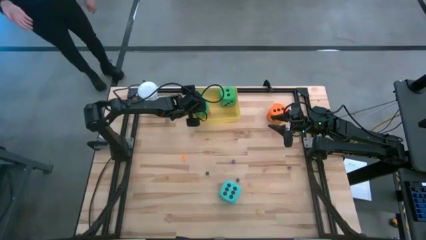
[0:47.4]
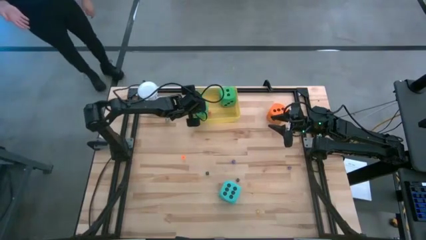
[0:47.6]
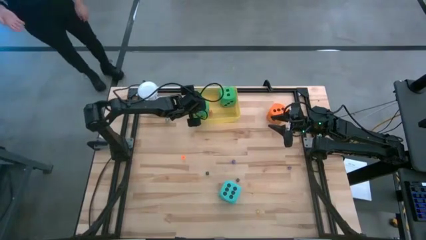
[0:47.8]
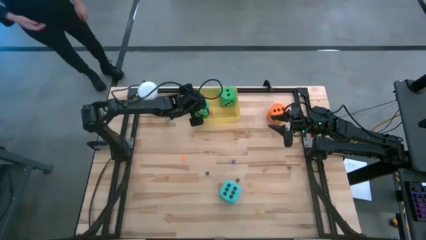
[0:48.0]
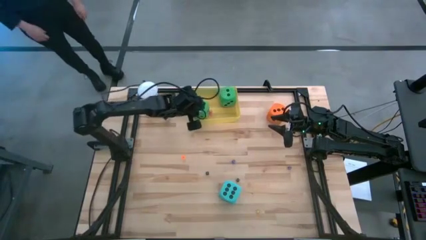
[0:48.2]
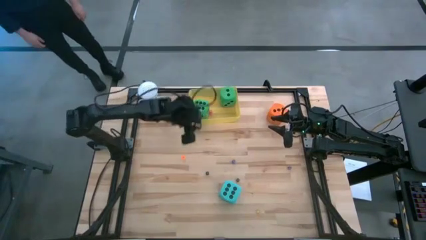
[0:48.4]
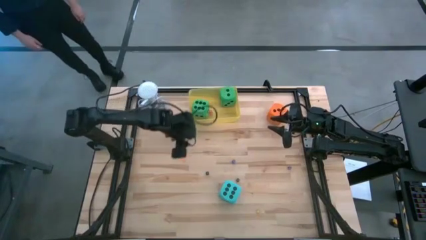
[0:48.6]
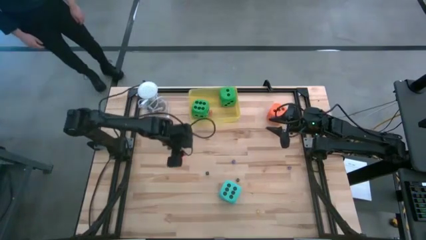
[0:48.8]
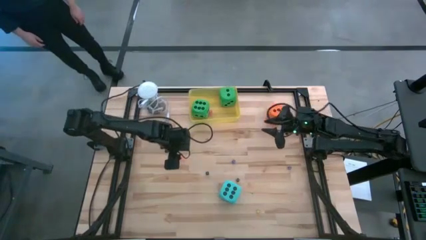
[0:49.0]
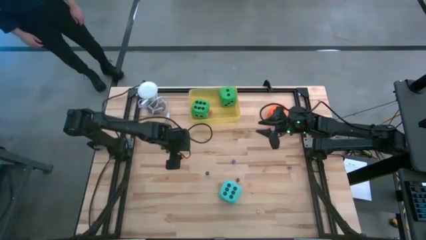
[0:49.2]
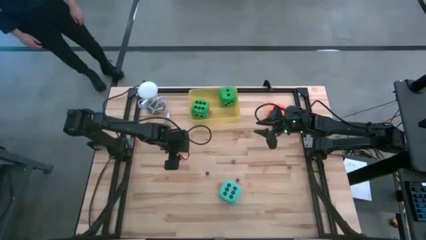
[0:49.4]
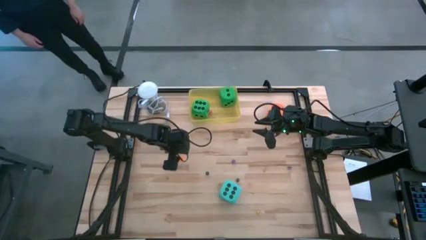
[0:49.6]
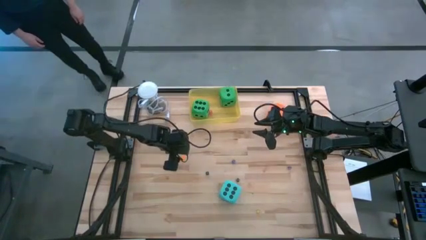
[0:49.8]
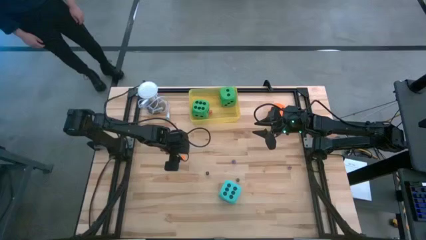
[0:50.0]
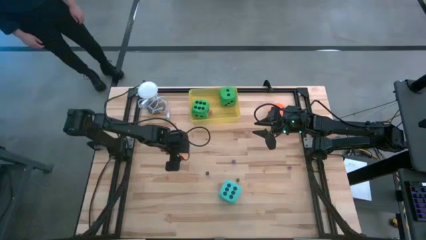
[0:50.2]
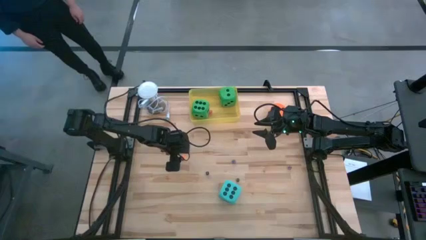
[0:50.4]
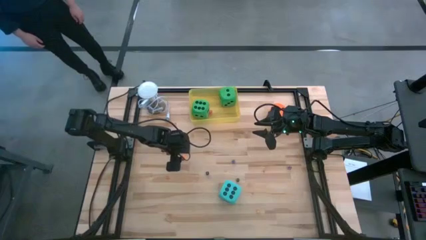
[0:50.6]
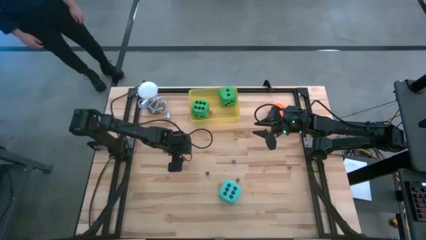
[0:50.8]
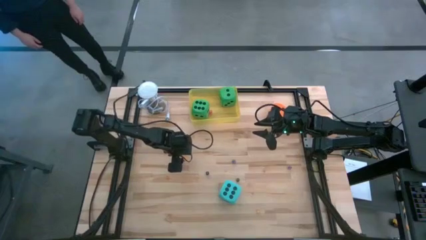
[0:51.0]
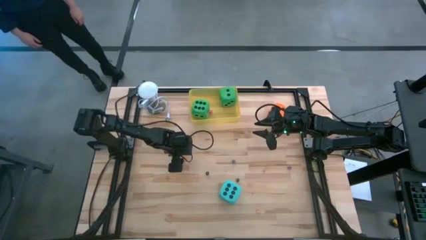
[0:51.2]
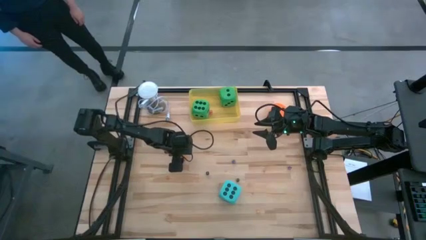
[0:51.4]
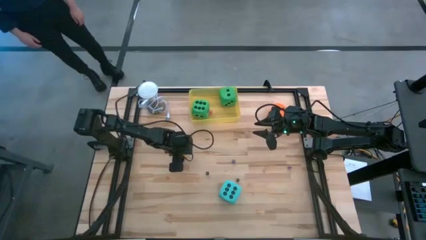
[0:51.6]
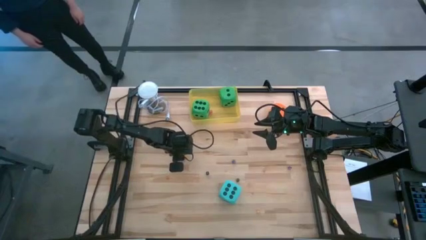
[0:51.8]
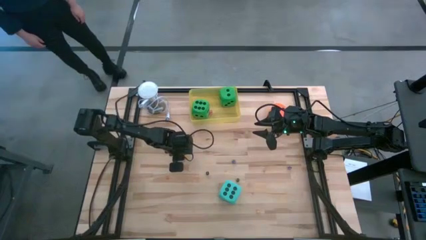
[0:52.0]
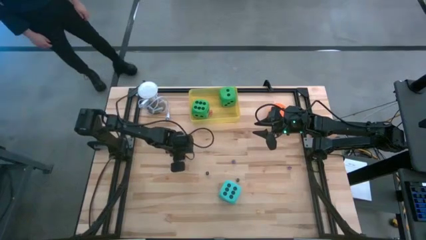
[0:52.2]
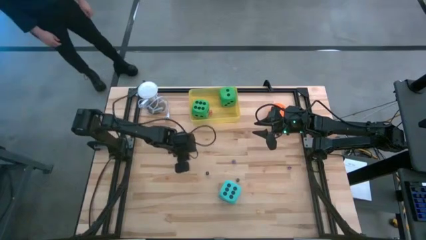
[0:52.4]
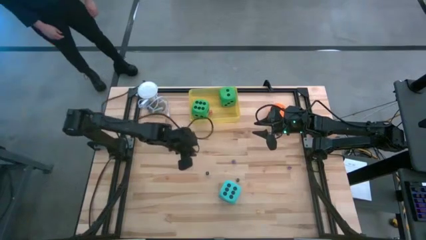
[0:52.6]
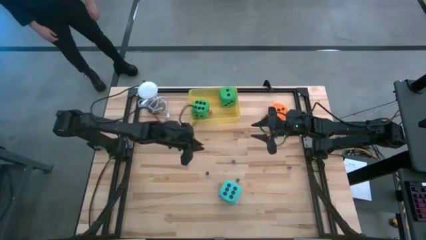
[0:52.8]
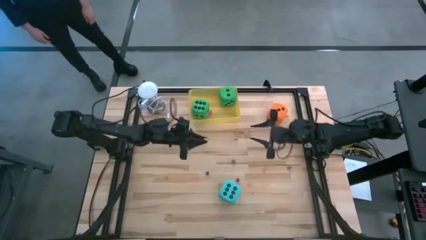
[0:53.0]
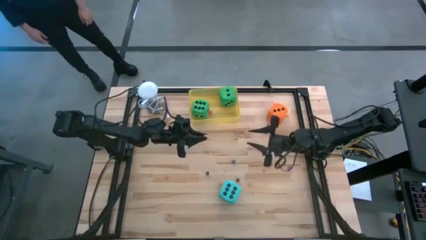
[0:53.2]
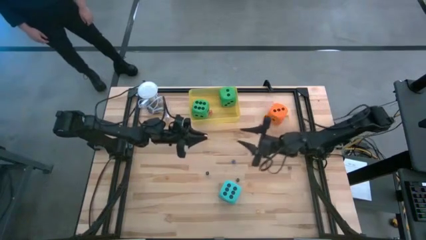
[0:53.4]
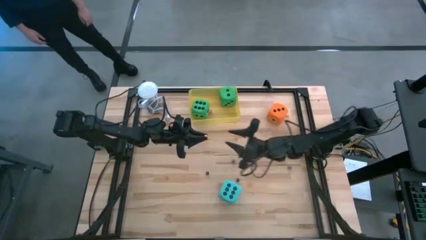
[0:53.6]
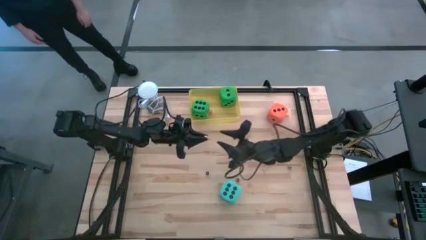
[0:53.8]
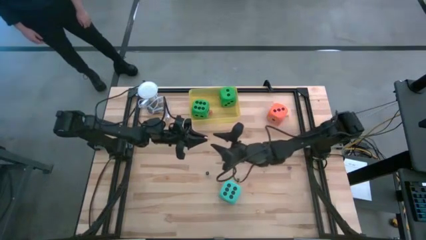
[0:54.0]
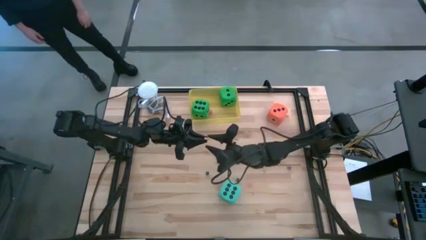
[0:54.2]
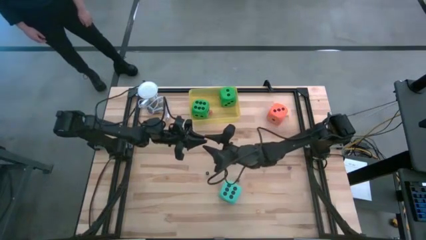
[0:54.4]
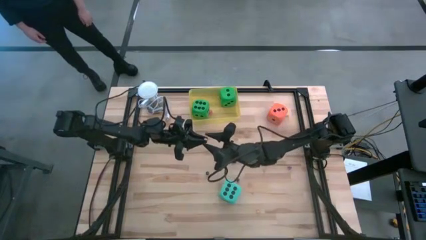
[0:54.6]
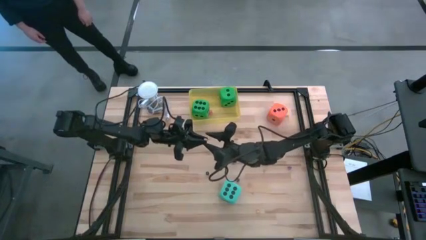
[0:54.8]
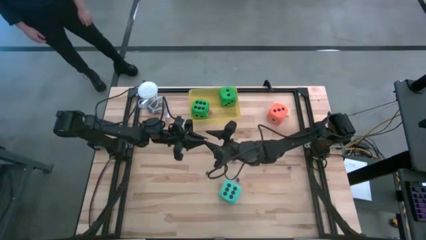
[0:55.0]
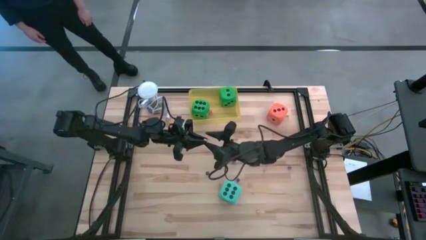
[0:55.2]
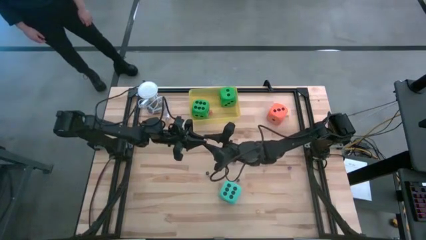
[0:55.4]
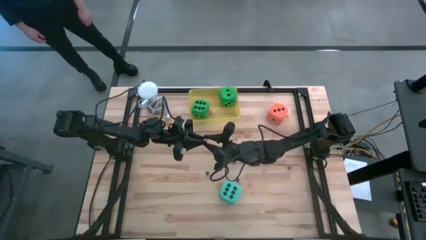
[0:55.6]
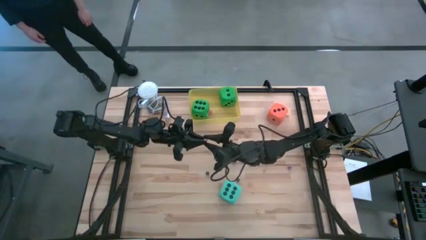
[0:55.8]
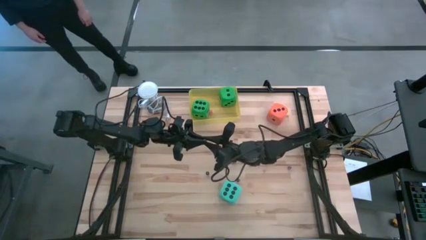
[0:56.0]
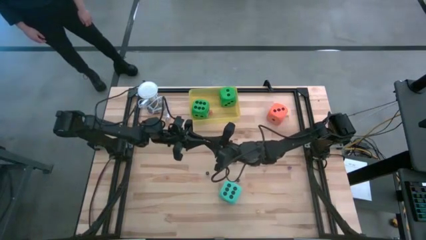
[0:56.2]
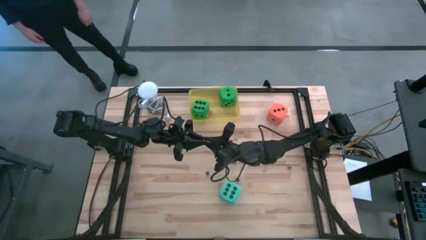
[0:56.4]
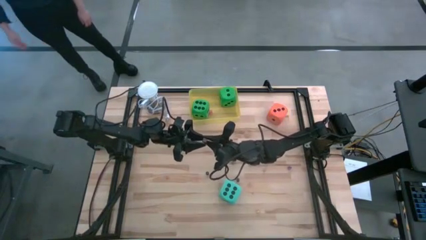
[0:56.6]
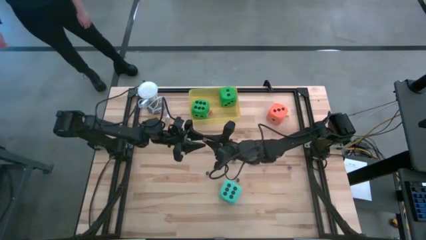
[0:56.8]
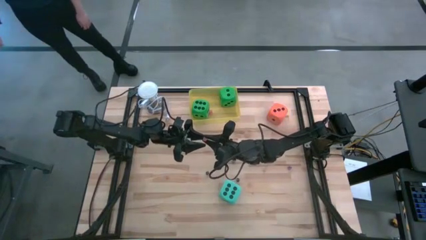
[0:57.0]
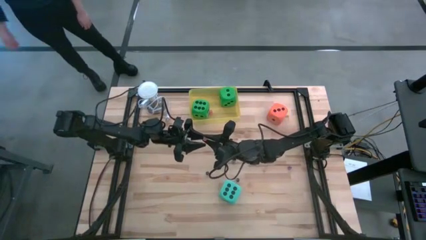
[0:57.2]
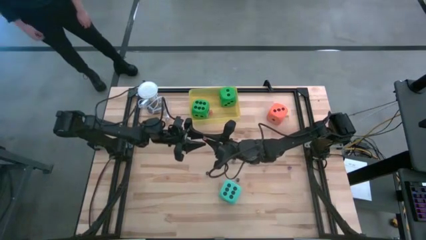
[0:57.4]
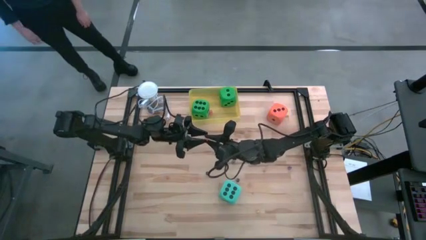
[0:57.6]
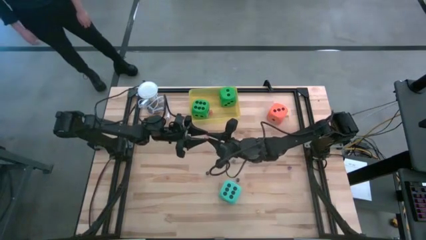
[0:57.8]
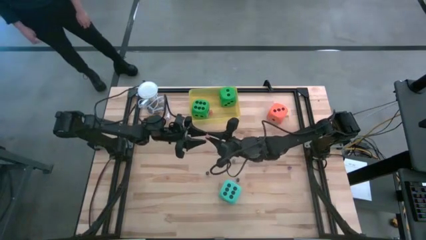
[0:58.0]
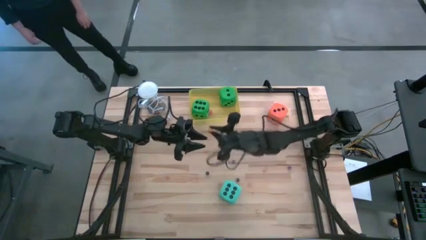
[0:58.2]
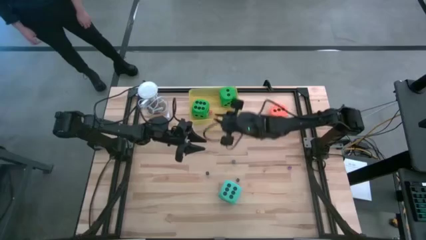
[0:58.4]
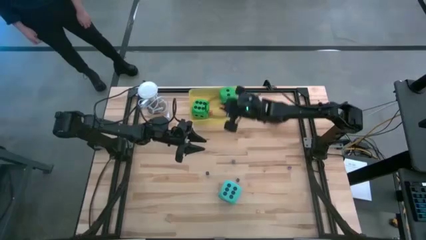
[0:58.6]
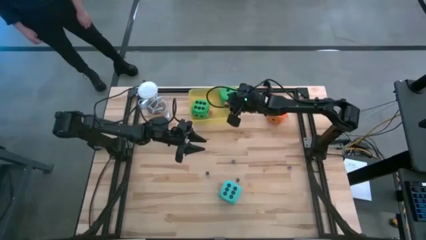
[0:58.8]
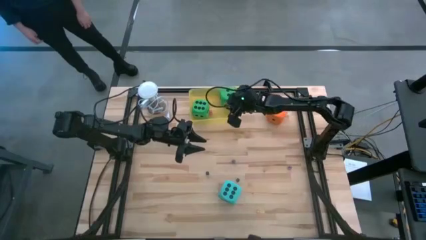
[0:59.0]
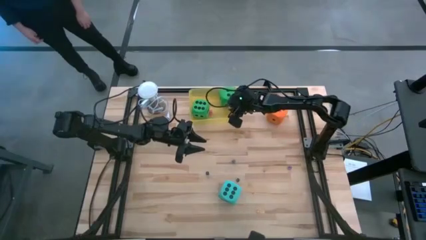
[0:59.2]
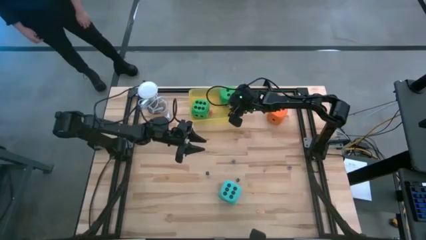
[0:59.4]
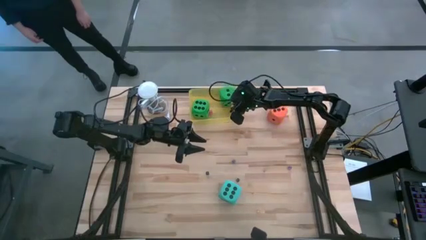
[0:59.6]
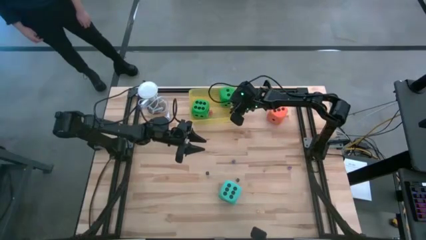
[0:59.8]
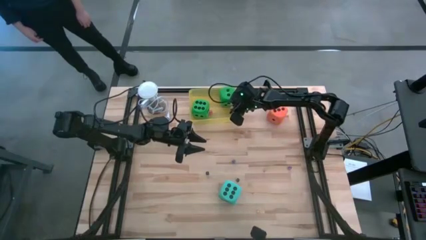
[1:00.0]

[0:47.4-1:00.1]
Task: Pick & Place Dice
Put the orange small die into the yellow bin
